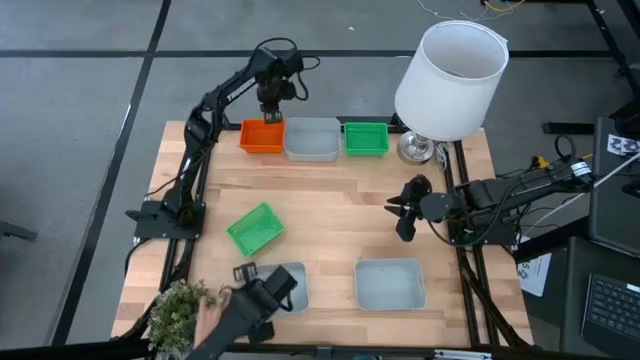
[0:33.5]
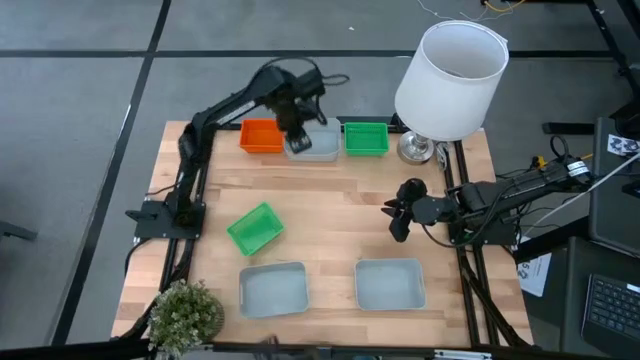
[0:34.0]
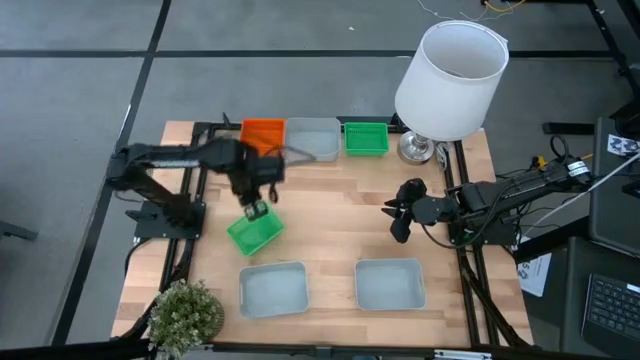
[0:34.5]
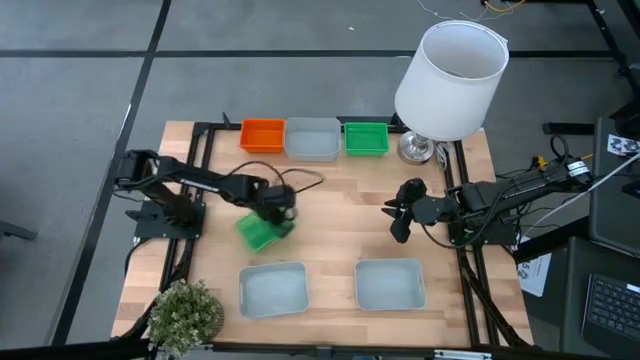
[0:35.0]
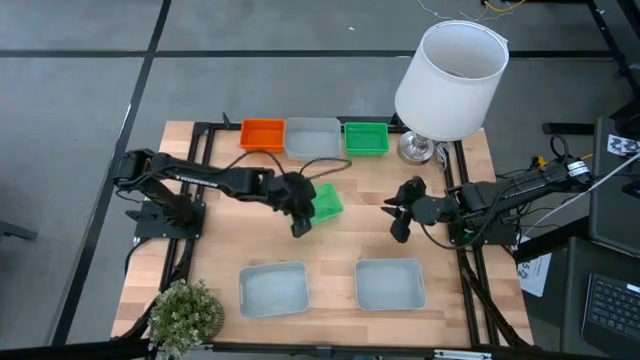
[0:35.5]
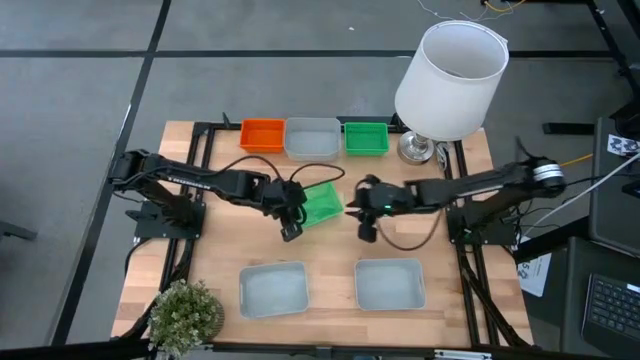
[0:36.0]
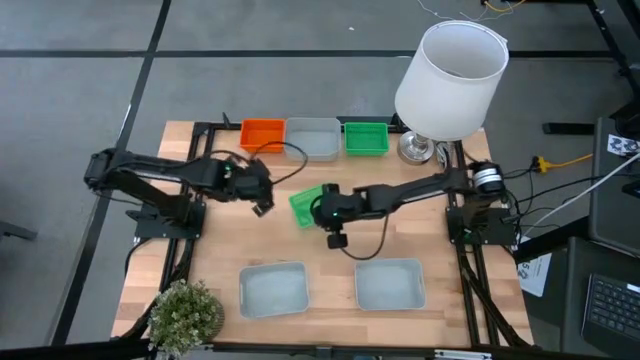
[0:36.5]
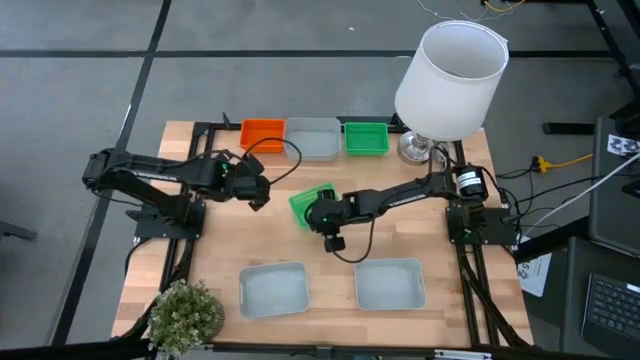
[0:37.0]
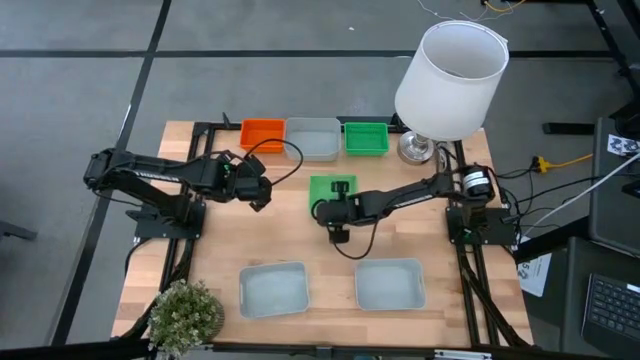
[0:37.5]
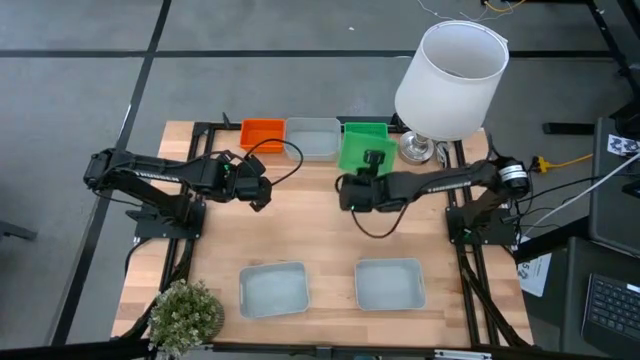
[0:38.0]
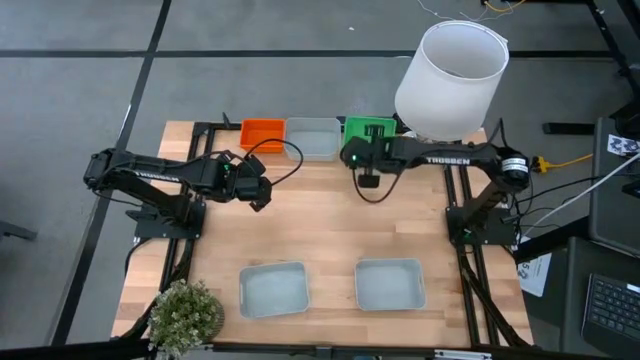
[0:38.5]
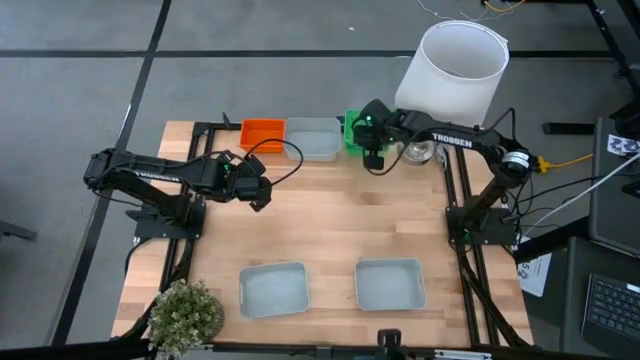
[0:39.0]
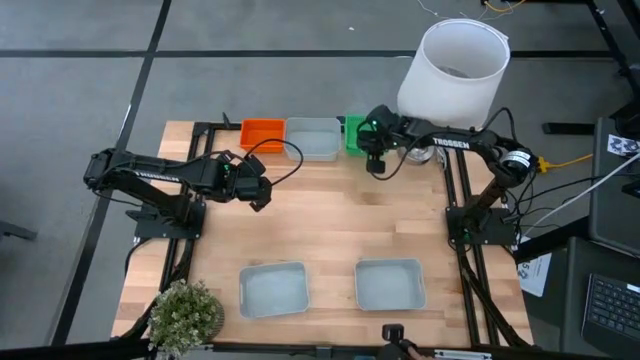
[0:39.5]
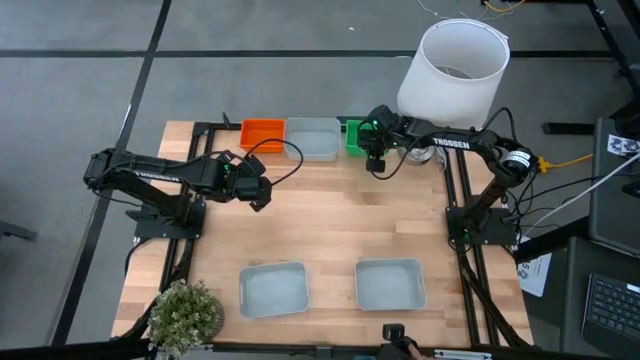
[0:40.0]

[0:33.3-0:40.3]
Stack the bottom green bin on the green bin

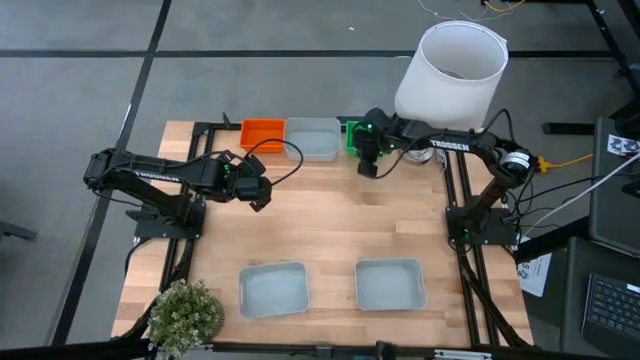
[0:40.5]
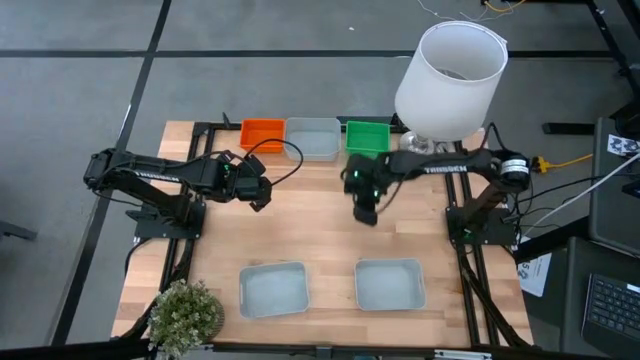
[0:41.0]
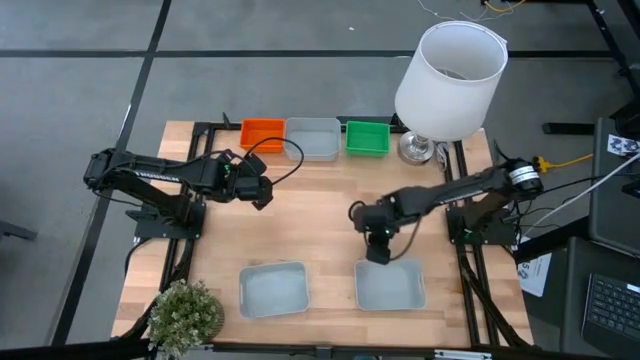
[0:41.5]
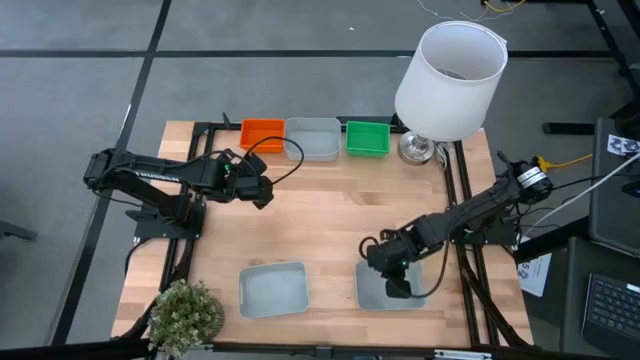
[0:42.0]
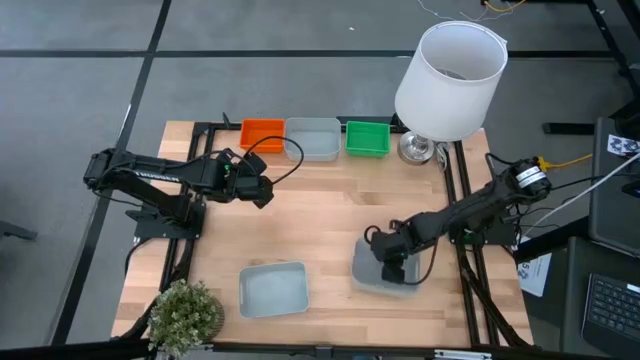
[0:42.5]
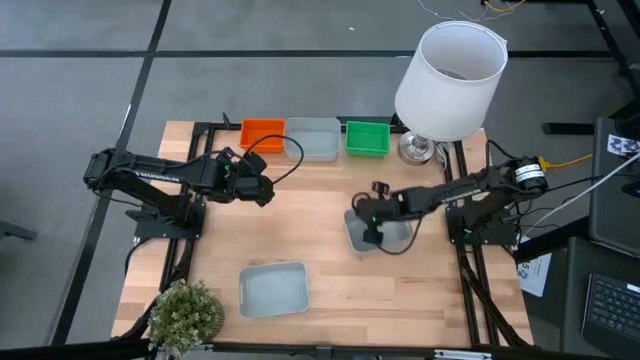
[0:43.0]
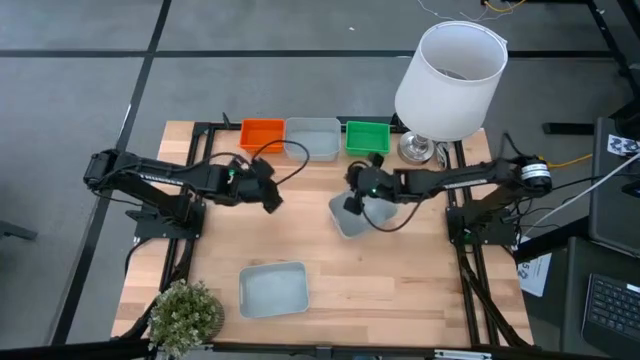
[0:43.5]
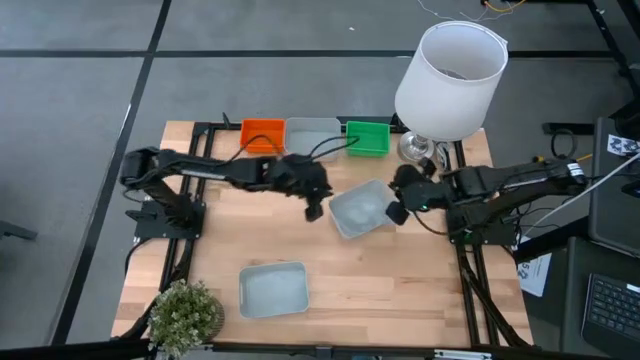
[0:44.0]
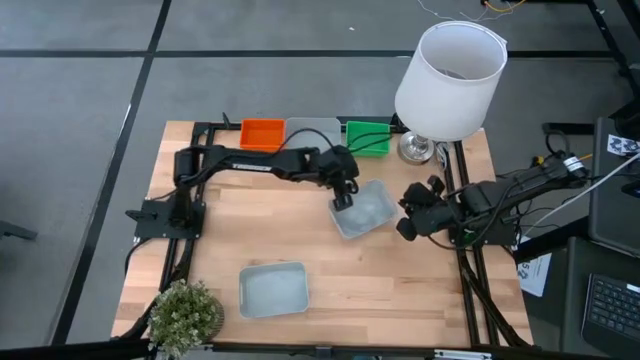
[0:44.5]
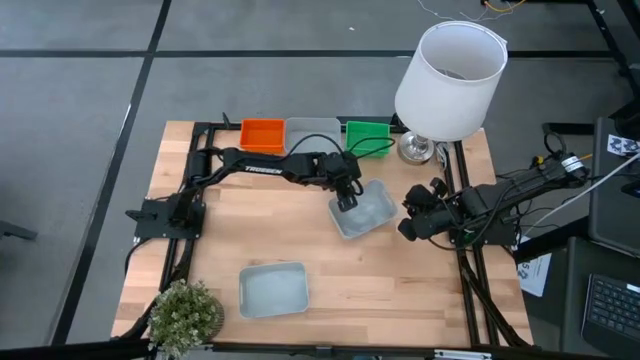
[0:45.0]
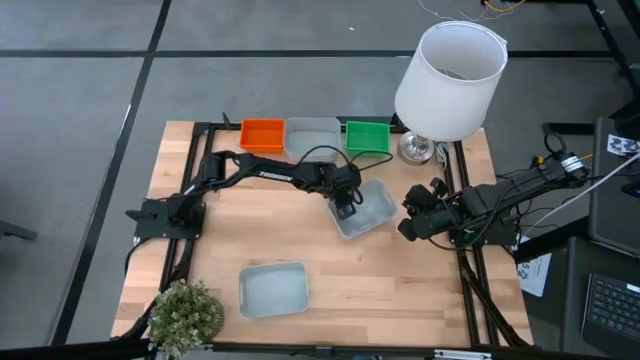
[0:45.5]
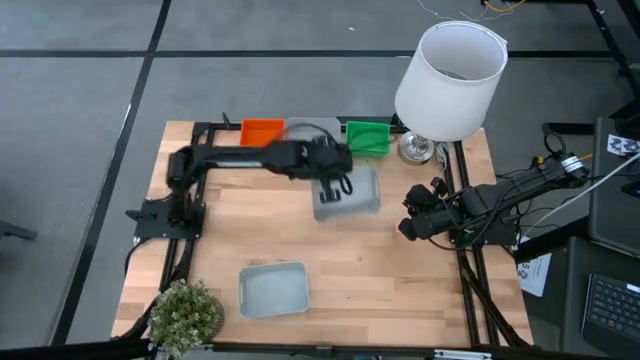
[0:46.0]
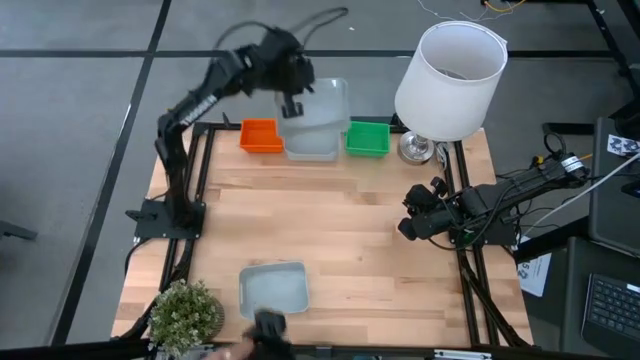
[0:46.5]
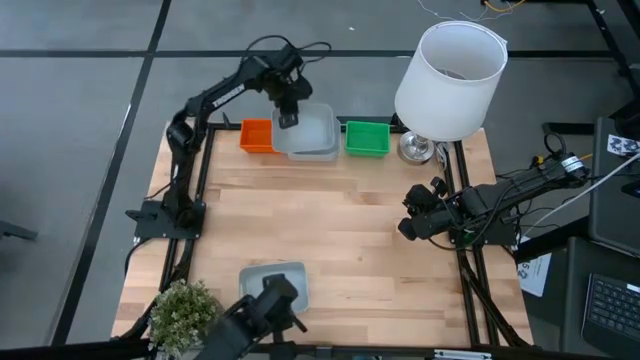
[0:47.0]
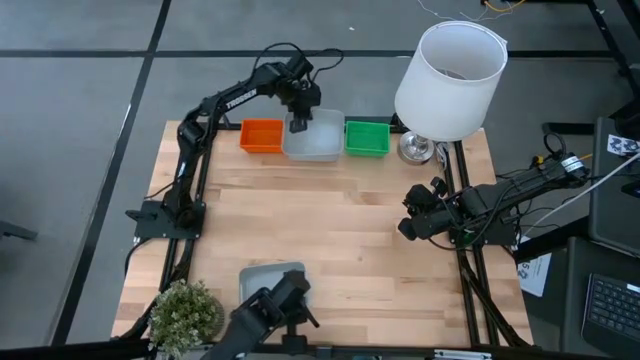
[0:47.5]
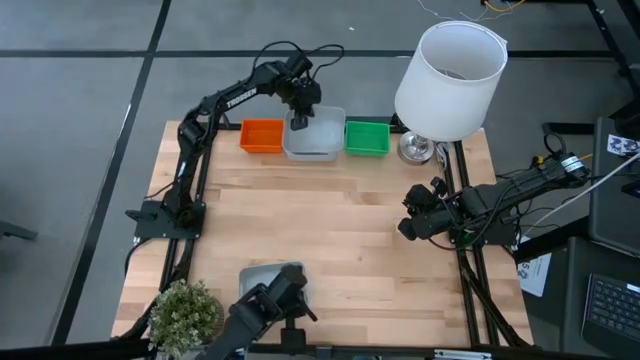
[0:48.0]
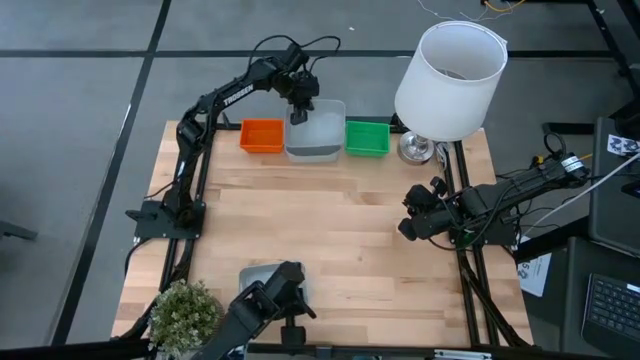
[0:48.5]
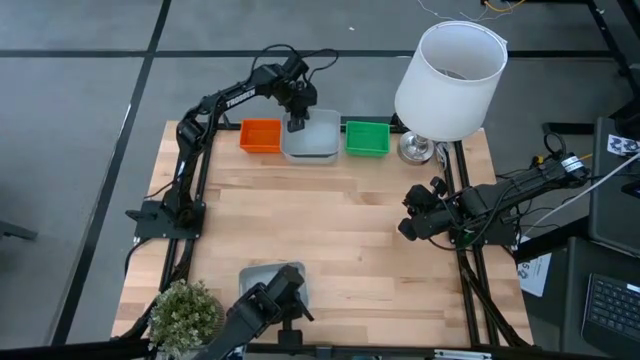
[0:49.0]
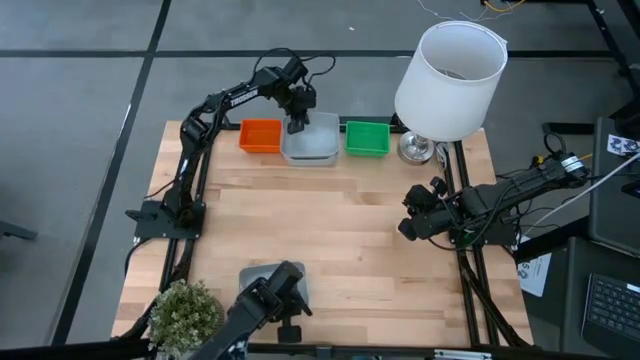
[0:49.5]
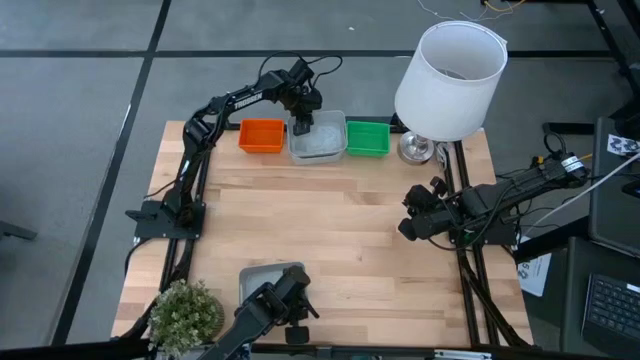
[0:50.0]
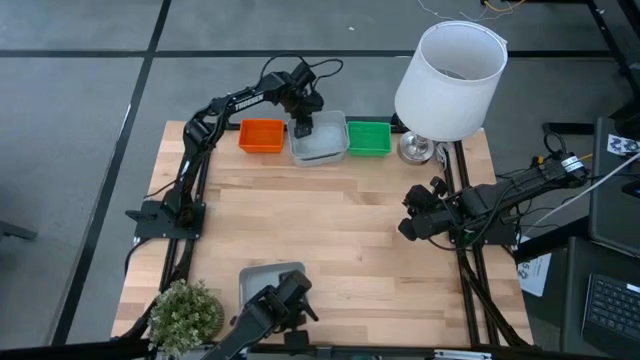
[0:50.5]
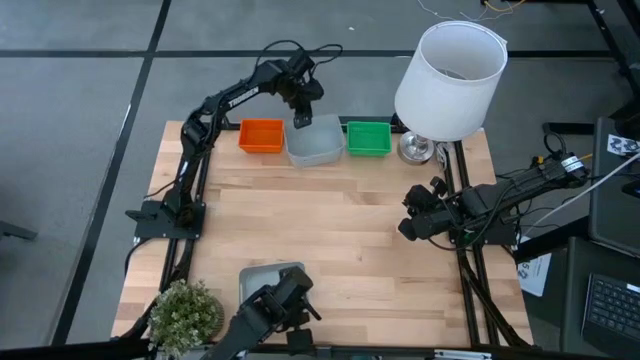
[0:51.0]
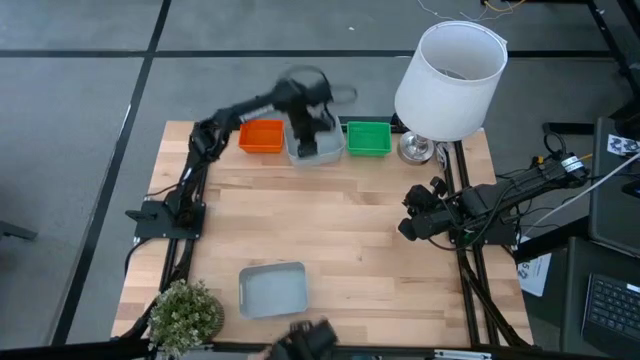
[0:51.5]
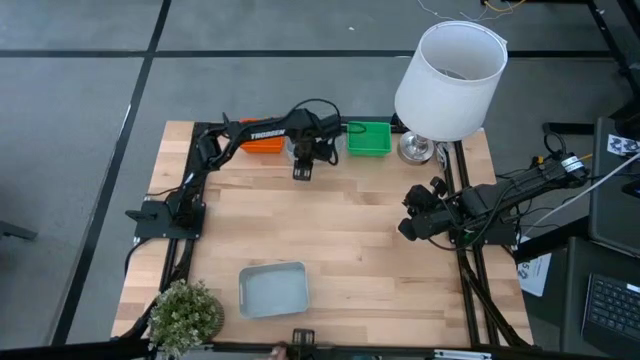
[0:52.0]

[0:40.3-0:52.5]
Stack the bottom right gray bin on the top gray bin
